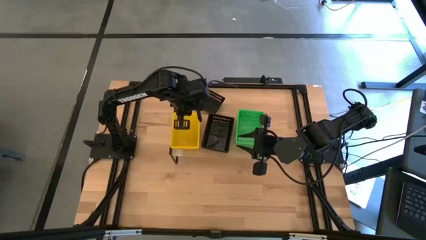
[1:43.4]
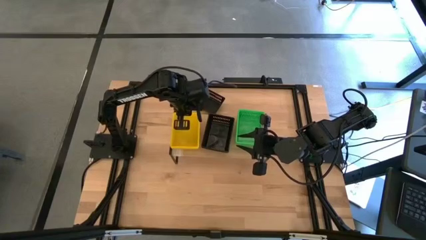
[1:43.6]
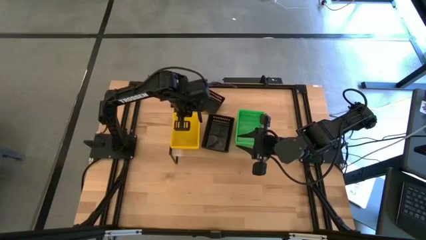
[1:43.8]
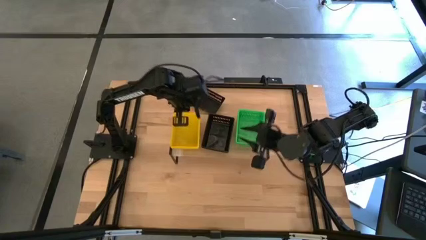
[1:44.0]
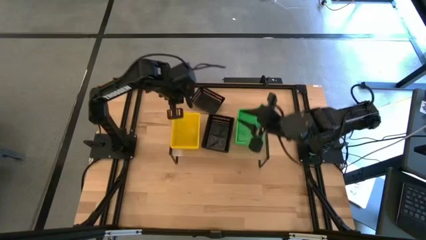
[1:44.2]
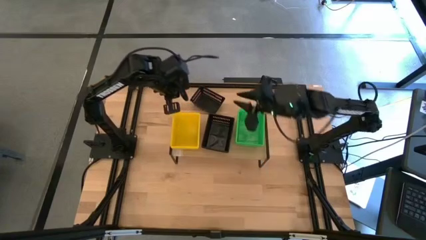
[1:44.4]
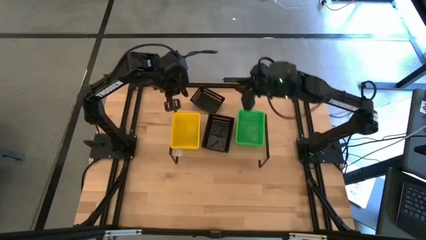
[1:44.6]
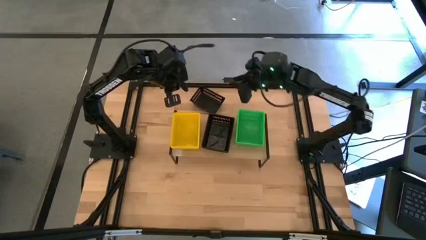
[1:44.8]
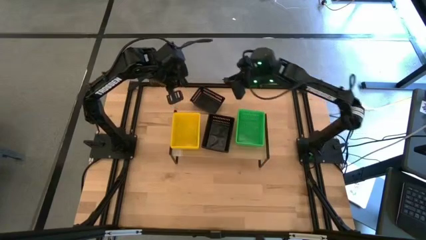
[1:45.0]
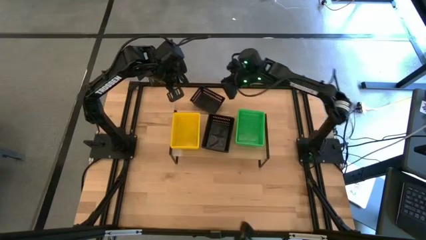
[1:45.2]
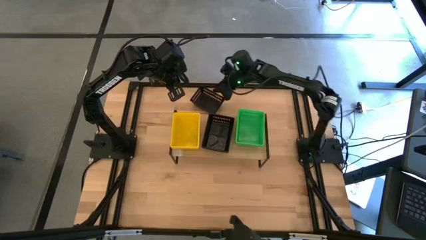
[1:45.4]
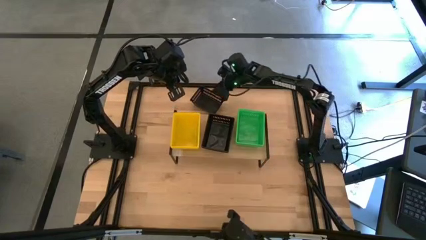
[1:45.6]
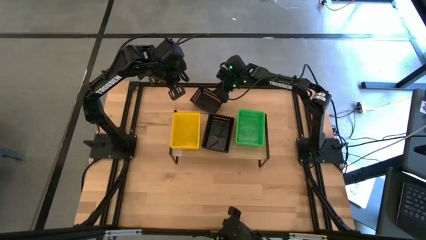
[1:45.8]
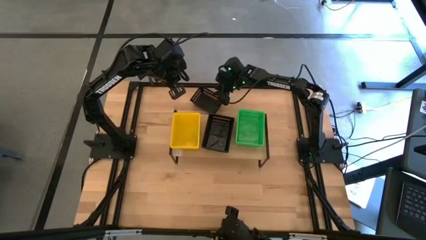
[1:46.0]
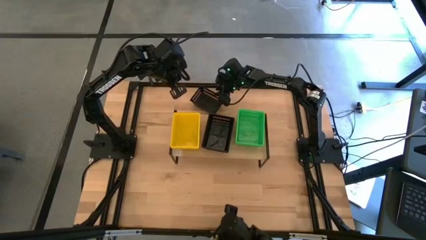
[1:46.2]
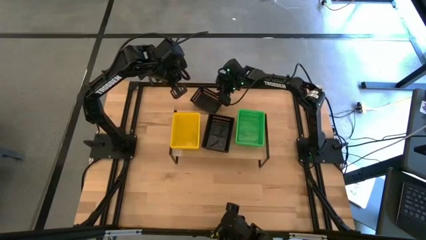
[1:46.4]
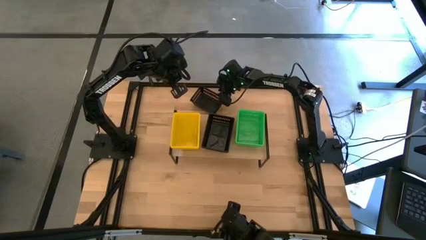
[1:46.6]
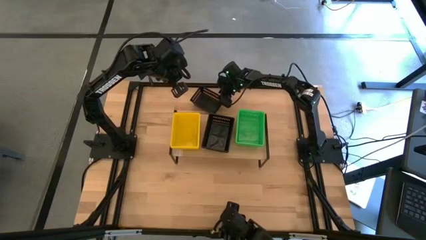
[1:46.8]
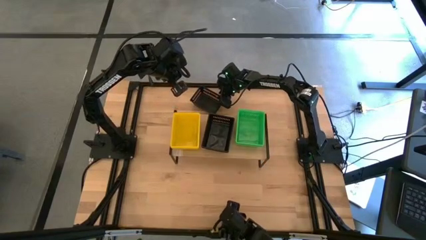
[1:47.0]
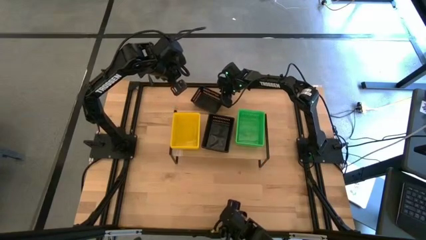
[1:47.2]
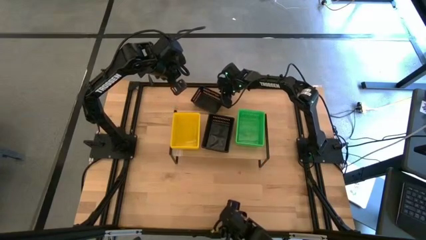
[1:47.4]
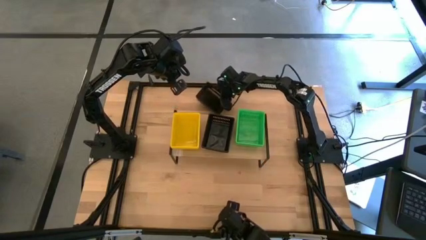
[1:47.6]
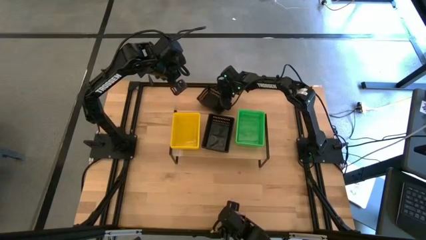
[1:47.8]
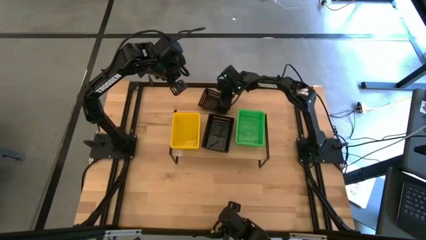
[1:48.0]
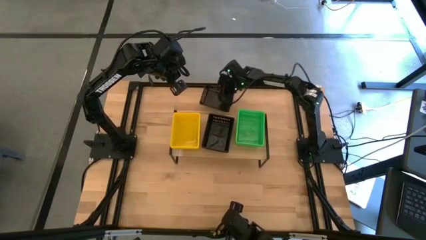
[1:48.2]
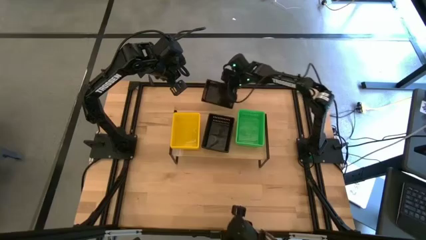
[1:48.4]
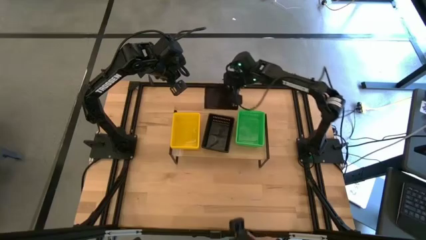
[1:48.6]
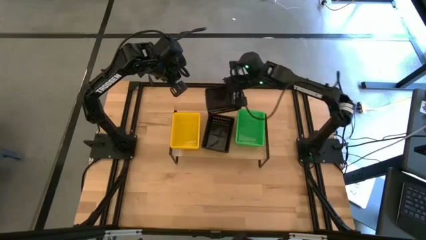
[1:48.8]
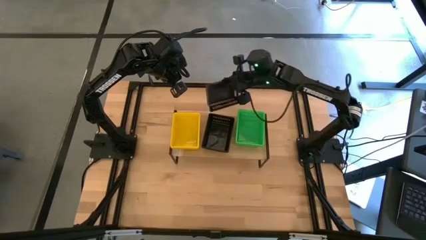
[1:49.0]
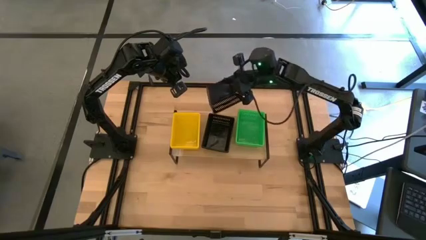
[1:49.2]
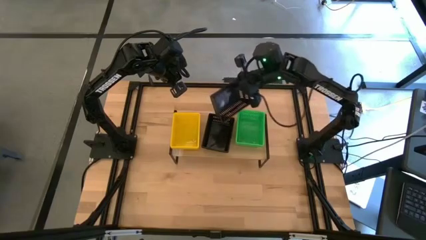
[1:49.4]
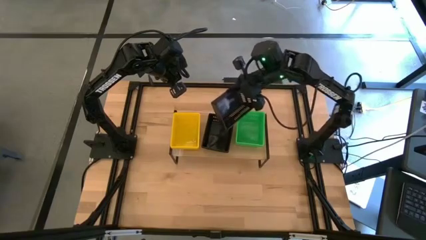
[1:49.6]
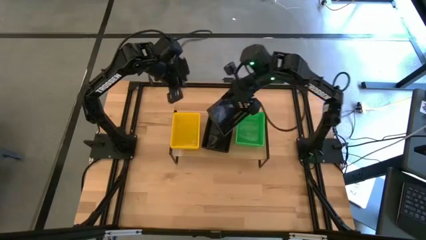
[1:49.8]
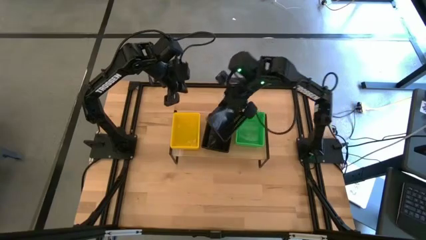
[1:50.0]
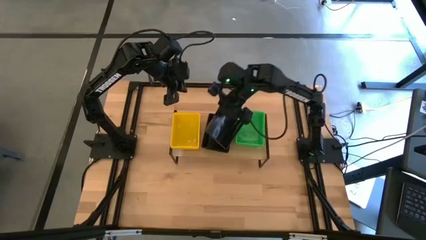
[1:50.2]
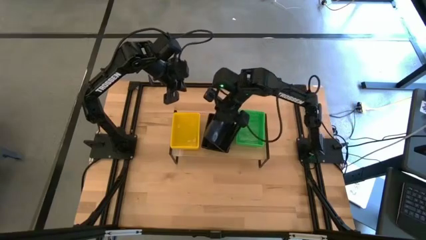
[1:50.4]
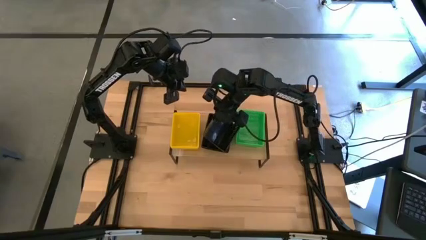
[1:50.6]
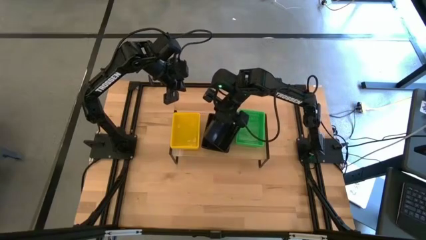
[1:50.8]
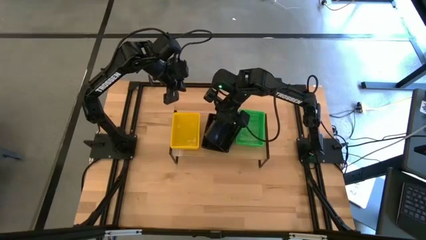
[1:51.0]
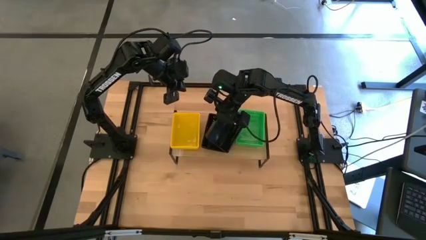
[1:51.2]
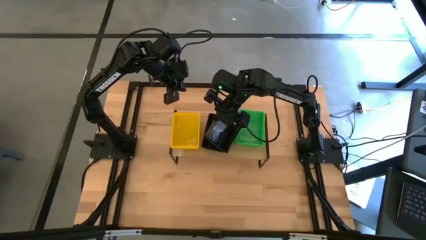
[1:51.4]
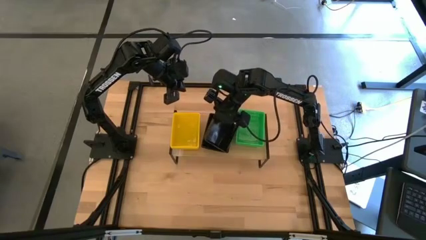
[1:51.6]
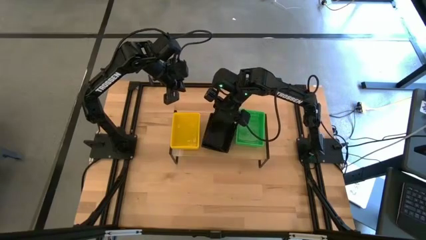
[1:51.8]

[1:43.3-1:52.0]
Task: Stack baskets on shelf by color
Stack the black bin on the stacked black bins on the shelf

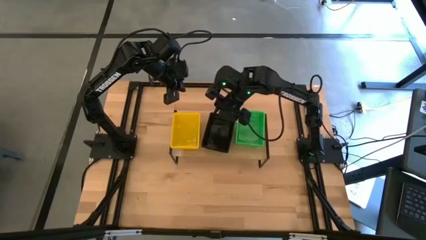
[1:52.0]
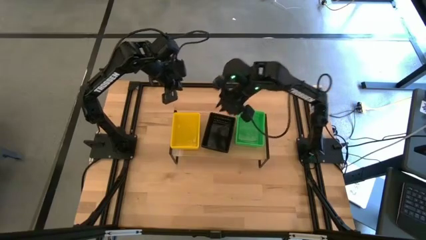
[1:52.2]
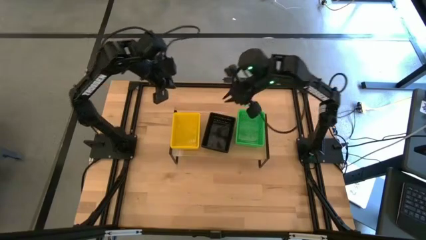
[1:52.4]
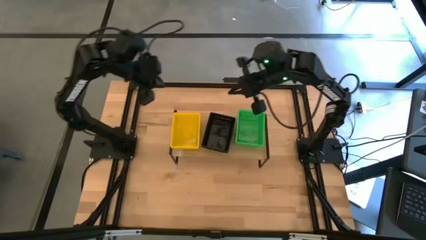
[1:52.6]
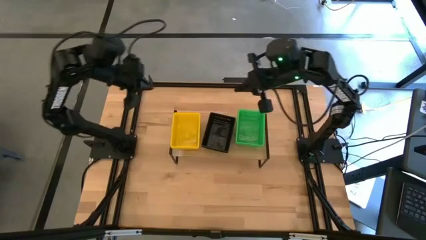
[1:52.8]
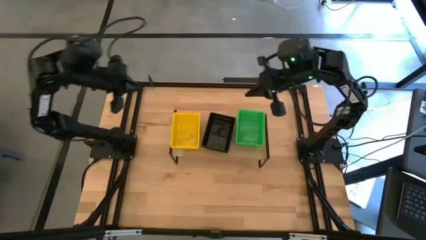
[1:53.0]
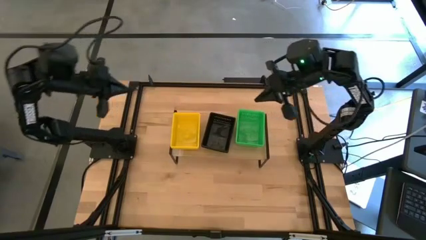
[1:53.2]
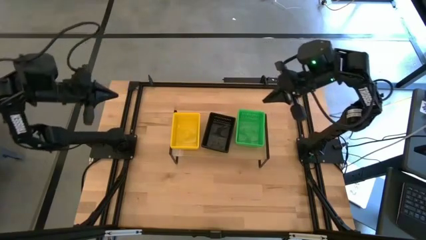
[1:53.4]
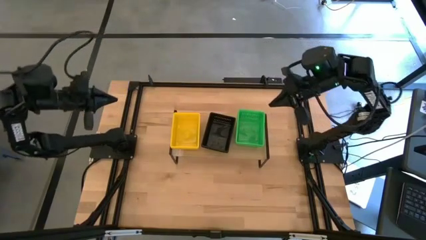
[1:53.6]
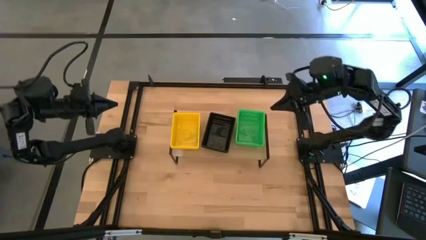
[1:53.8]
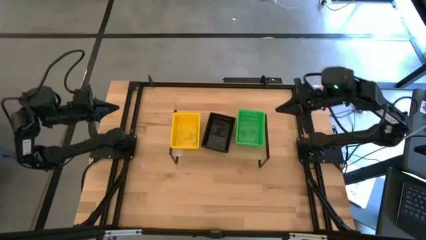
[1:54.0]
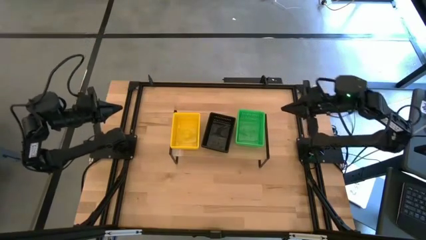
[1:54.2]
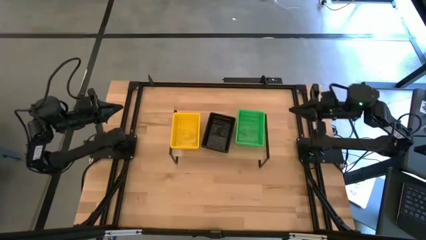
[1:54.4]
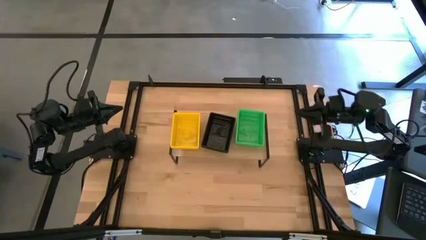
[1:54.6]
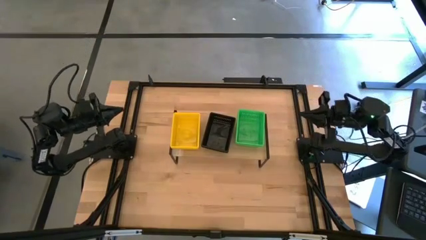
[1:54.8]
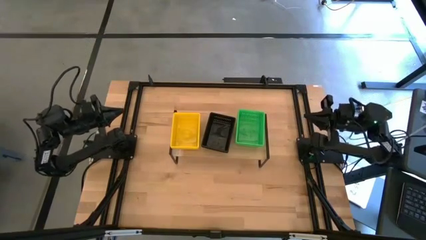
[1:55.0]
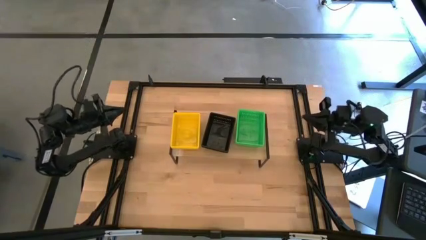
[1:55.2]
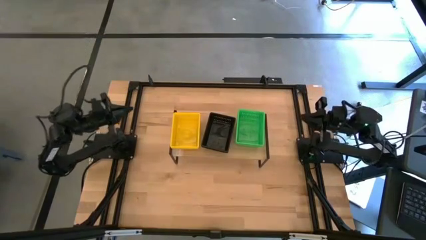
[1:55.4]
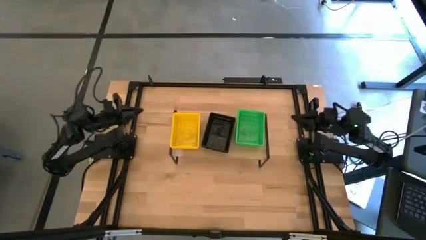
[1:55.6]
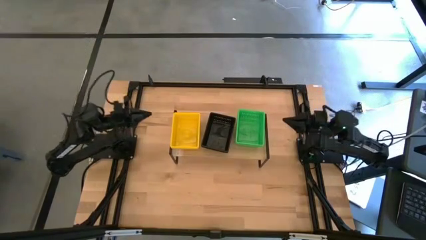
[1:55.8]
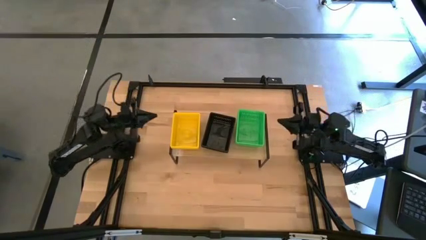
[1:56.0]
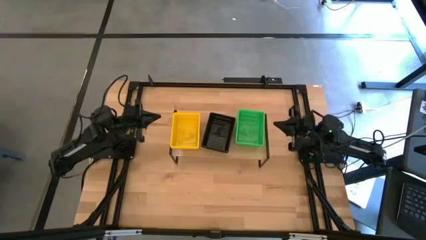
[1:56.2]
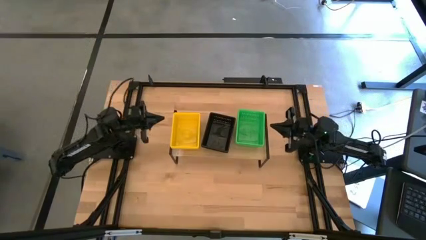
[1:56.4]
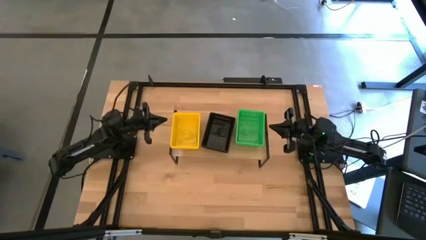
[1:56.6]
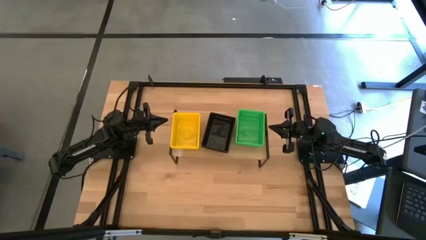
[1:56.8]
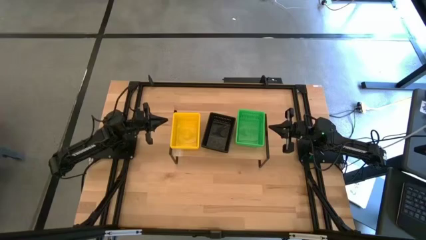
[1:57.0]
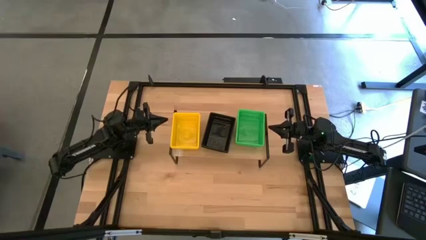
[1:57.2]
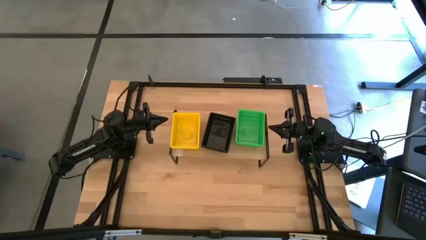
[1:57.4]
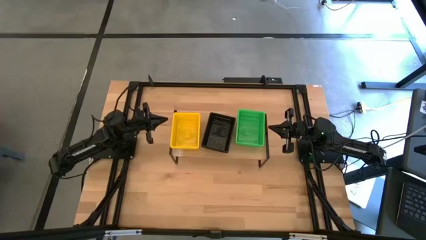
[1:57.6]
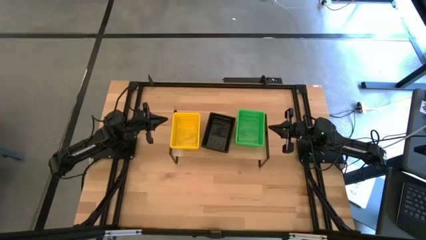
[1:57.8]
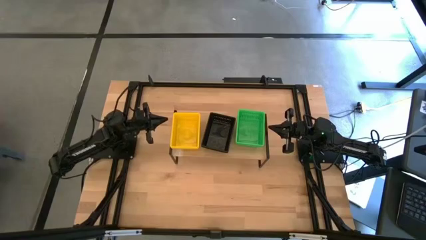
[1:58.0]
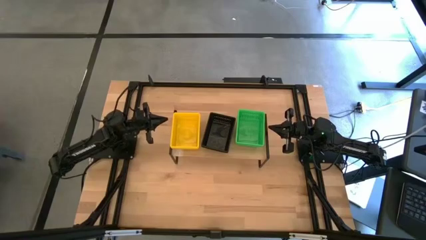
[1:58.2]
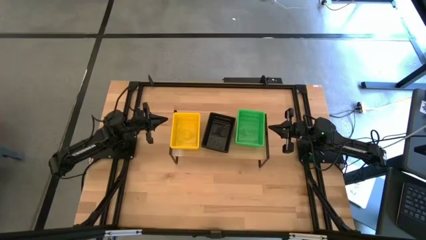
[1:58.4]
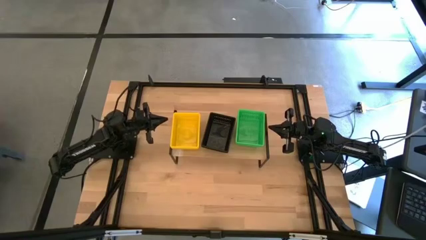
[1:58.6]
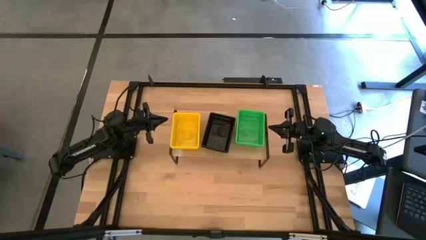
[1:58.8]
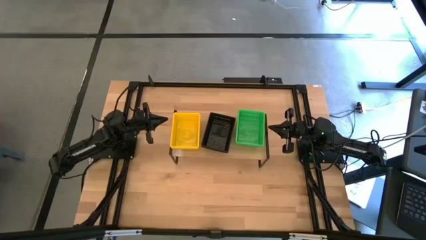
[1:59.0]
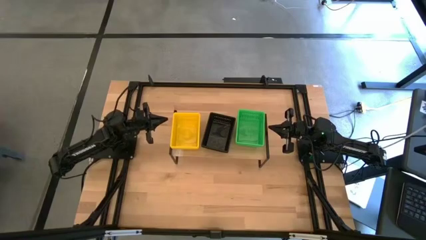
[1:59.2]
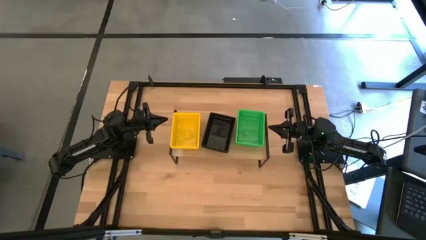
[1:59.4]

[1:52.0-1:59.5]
Return to Home Position
